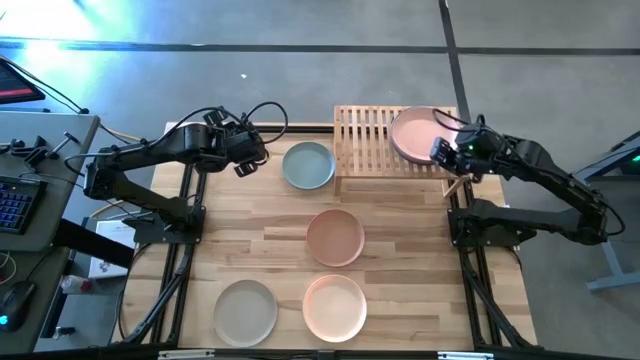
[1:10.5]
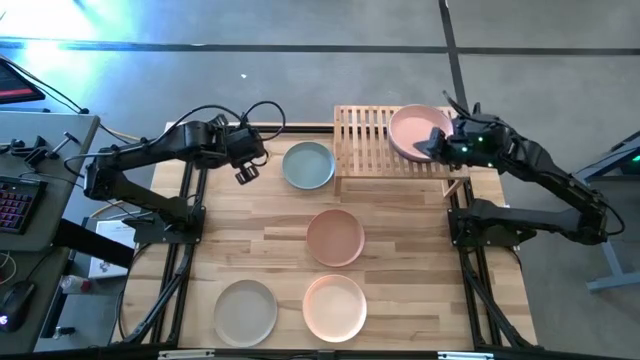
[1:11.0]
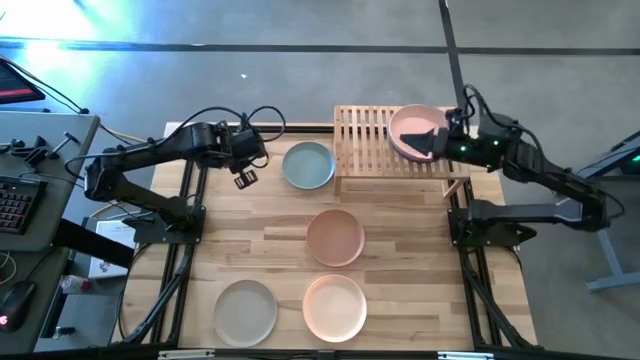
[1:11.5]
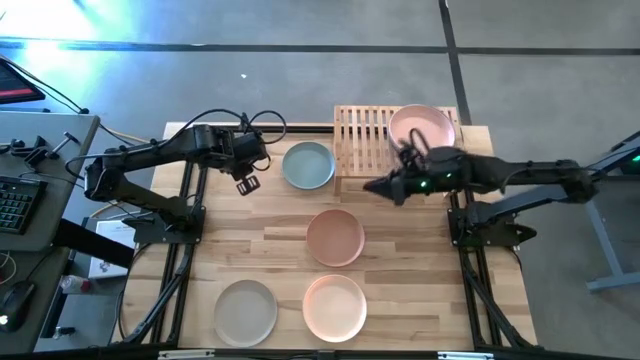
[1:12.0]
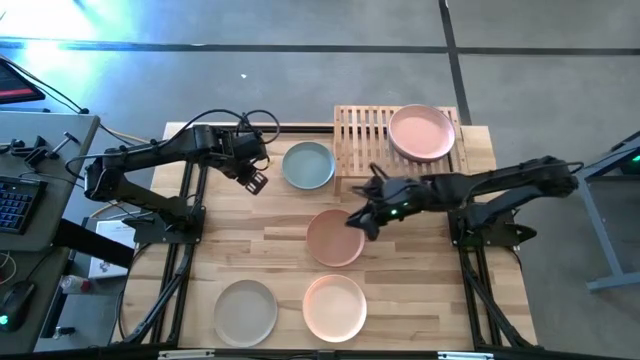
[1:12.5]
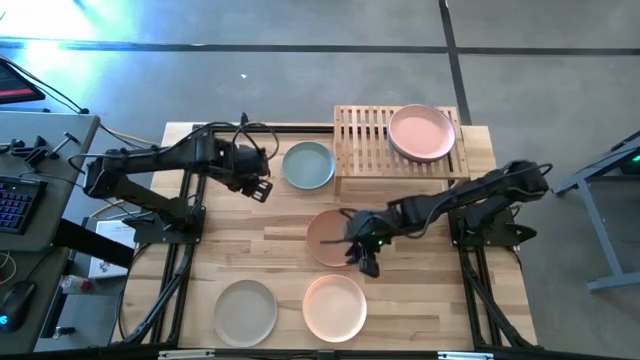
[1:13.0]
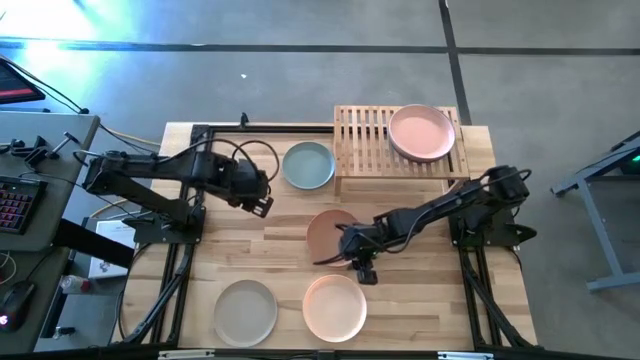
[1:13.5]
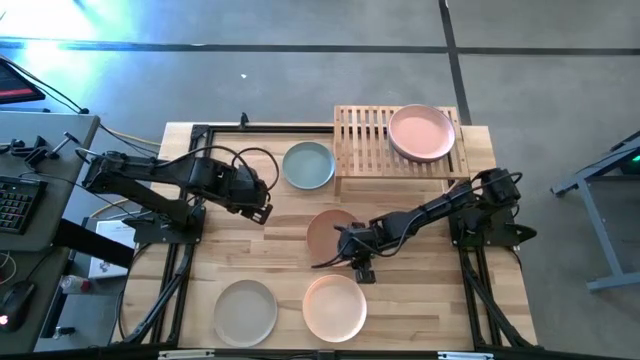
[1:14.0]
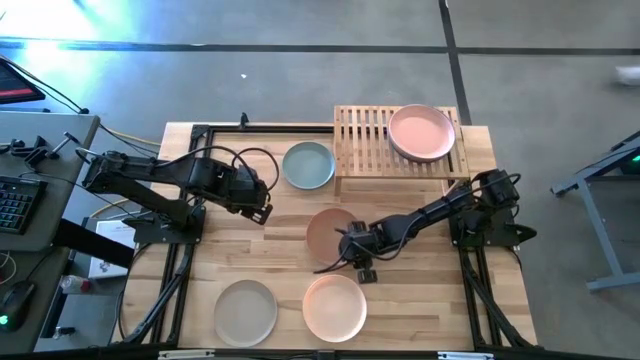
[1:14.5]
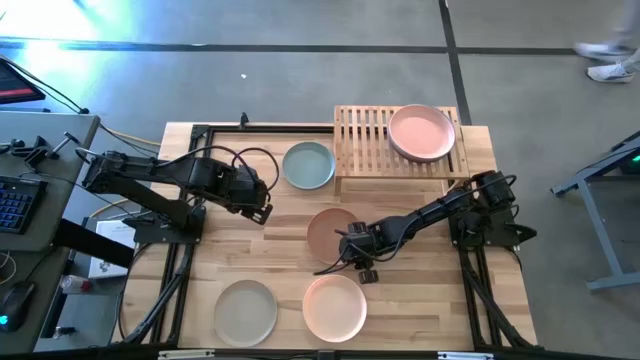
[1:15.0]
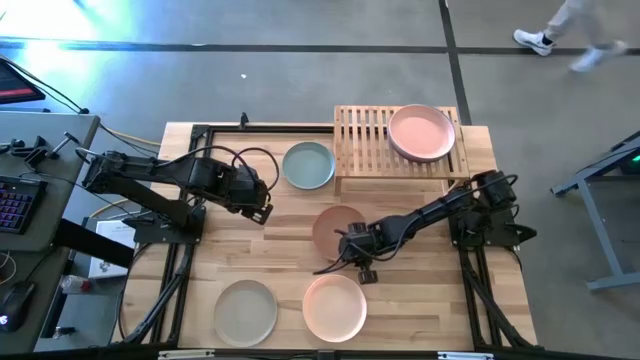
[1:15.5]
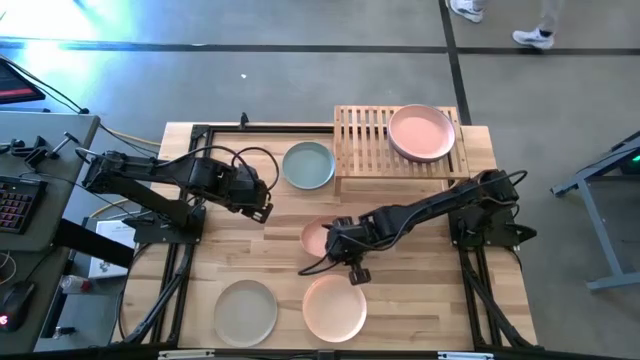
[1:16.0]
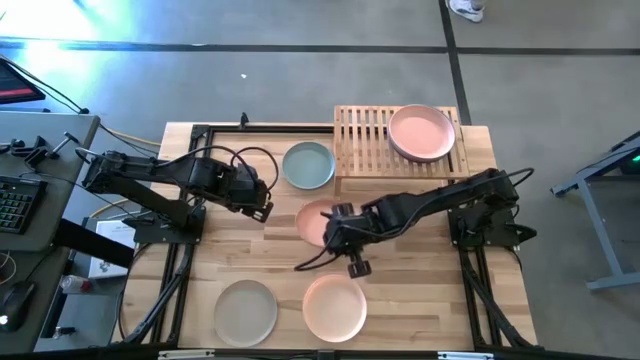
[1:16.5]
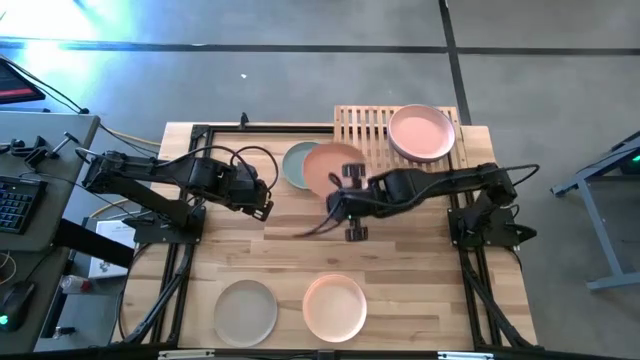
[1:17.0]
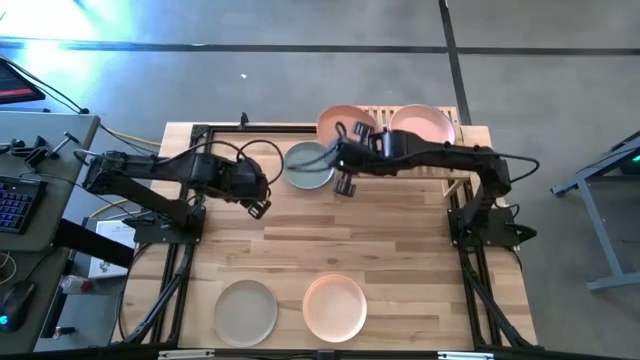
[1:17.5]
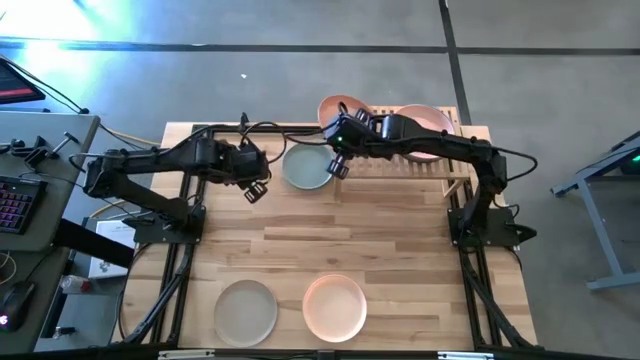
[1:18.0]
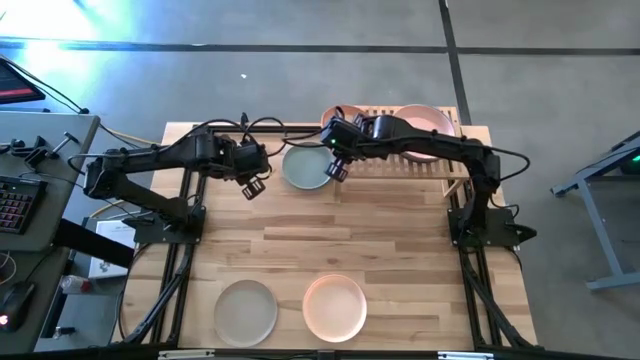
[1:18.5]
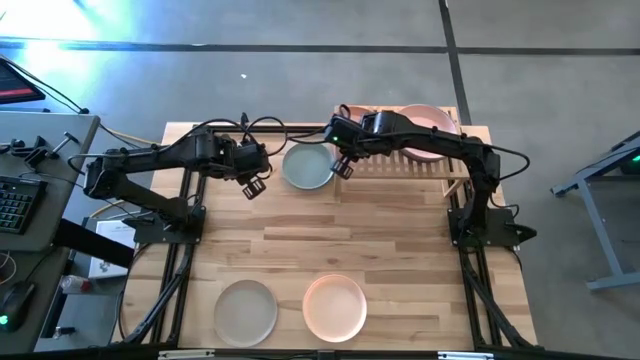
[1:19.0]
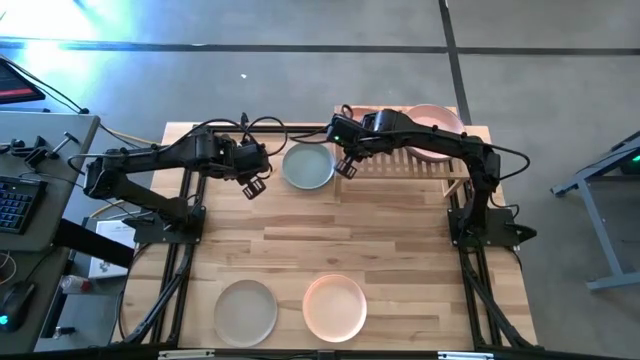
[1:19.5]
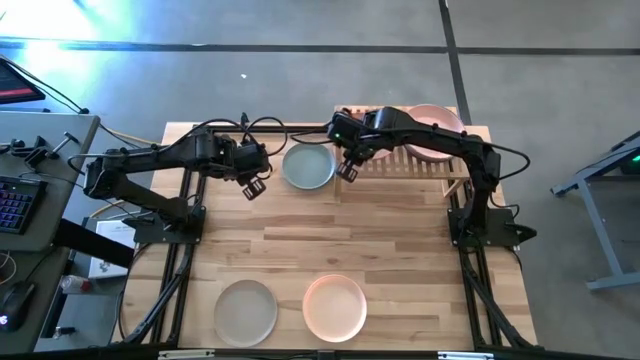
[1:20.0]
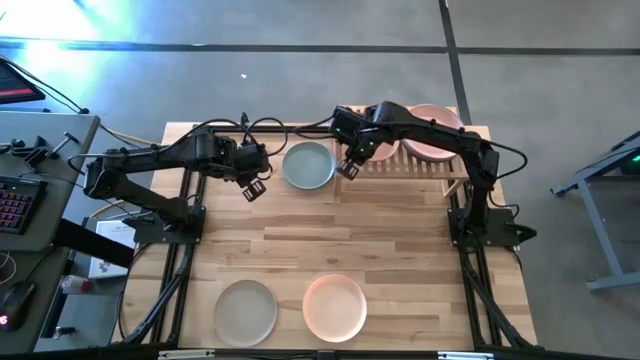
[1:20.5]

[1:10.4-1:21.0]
Task: Place and stack plates onto a shelf
Put the light brown plate on the shelf

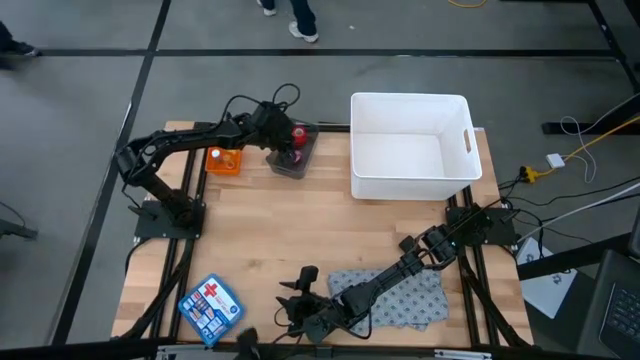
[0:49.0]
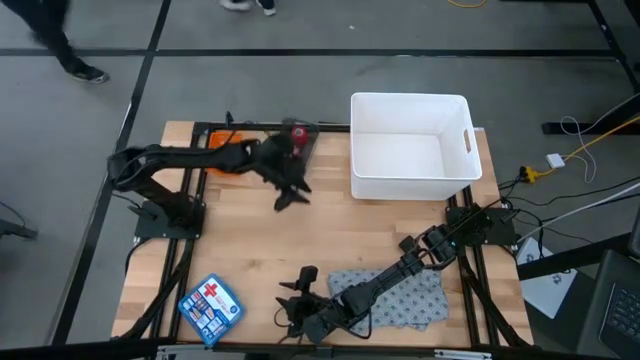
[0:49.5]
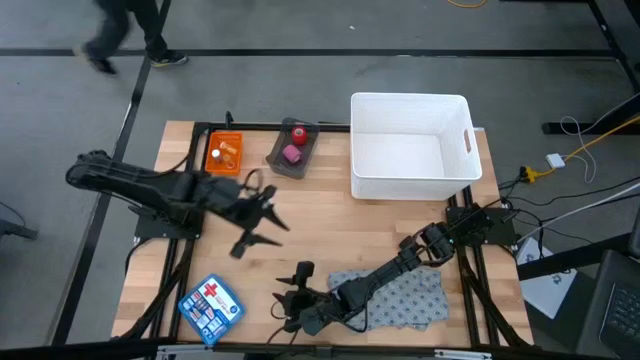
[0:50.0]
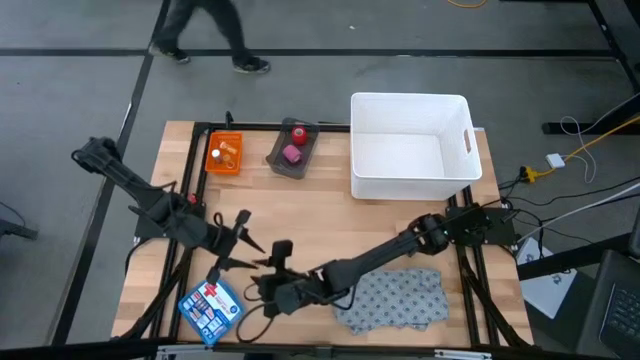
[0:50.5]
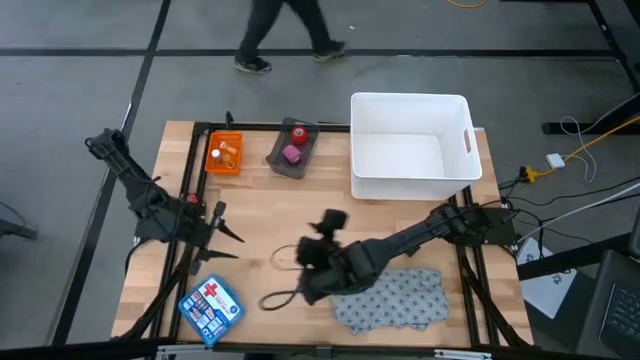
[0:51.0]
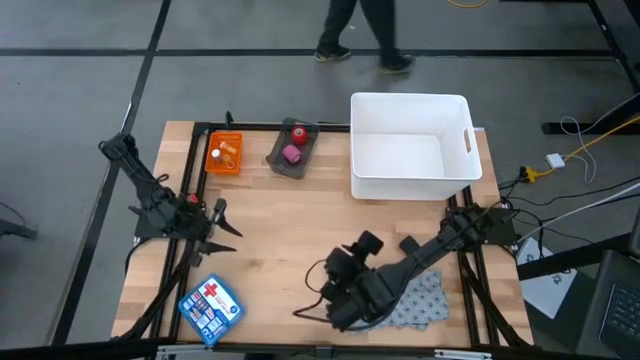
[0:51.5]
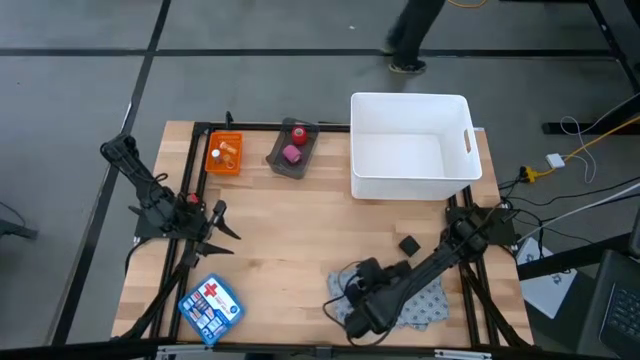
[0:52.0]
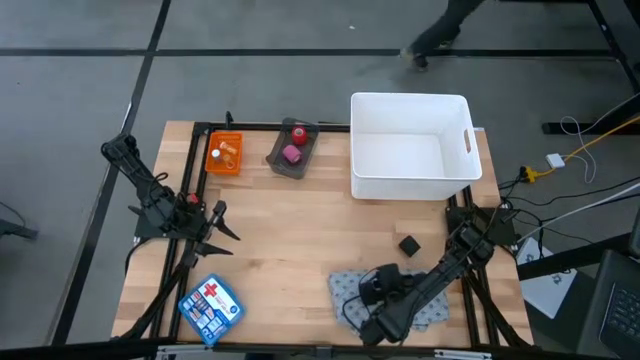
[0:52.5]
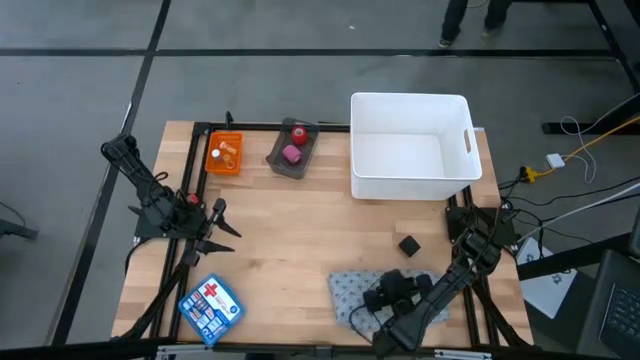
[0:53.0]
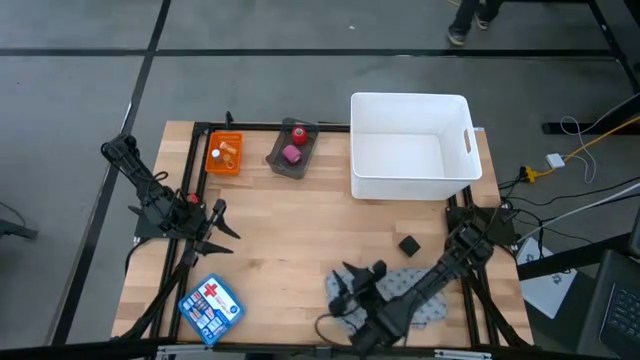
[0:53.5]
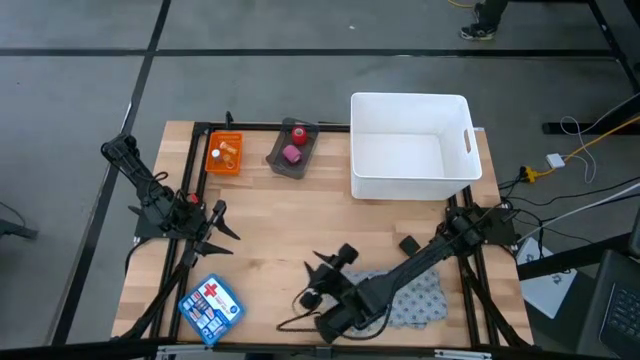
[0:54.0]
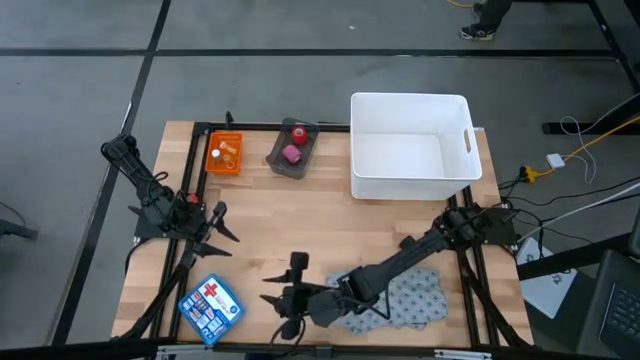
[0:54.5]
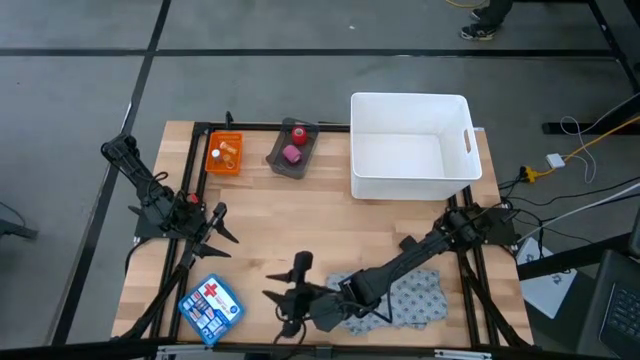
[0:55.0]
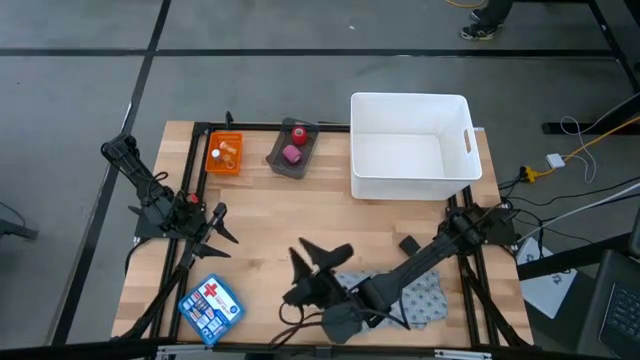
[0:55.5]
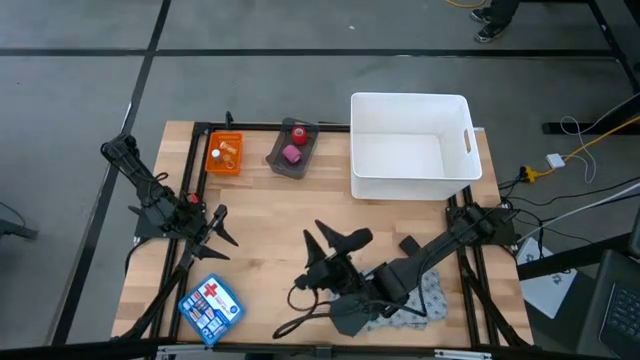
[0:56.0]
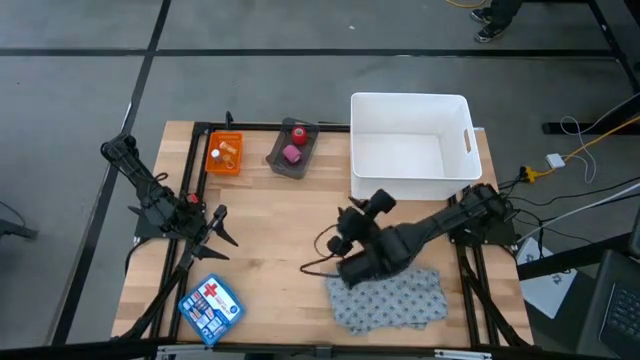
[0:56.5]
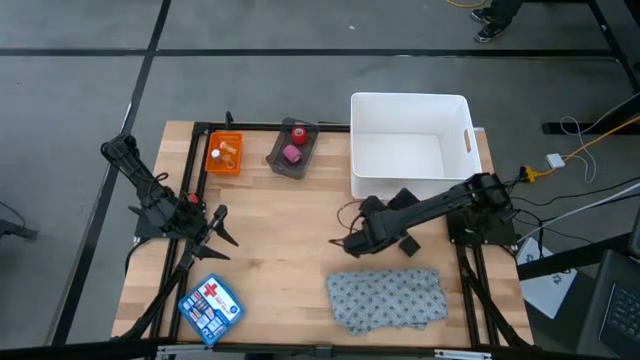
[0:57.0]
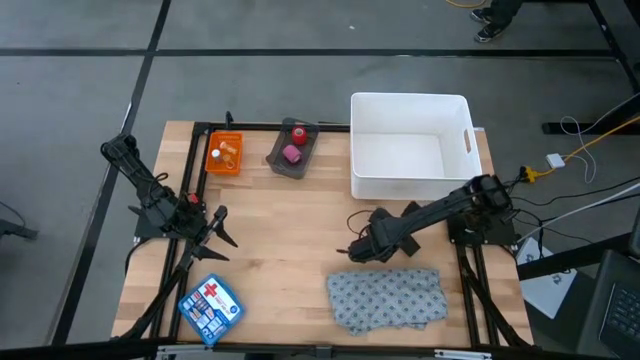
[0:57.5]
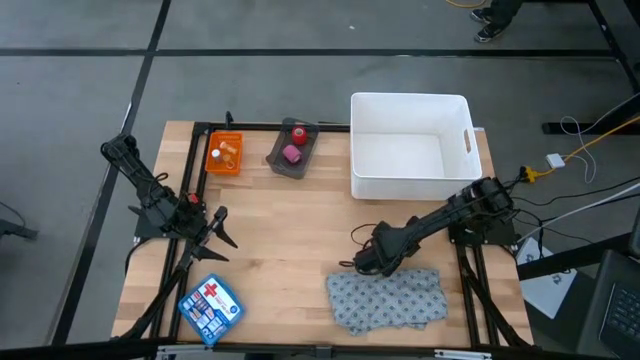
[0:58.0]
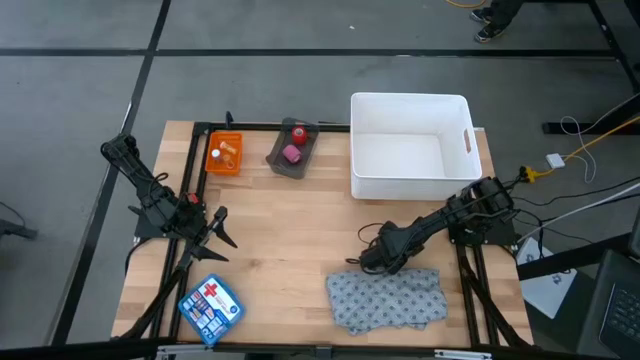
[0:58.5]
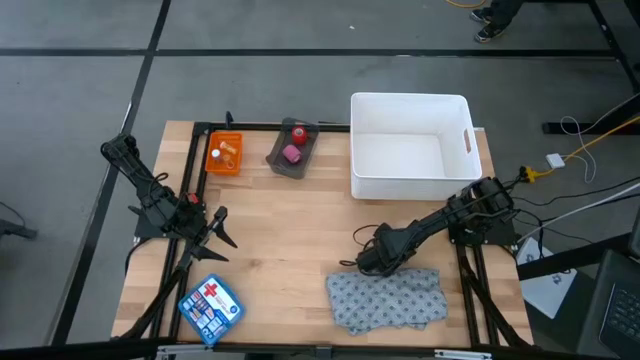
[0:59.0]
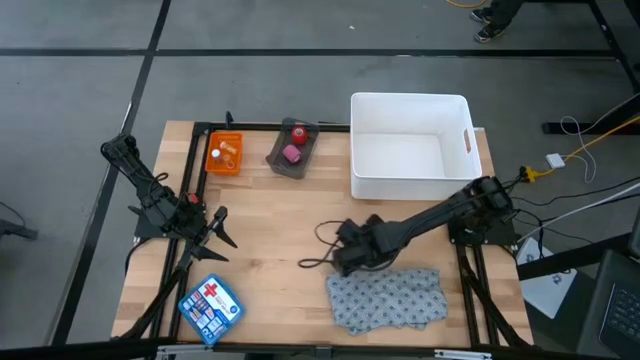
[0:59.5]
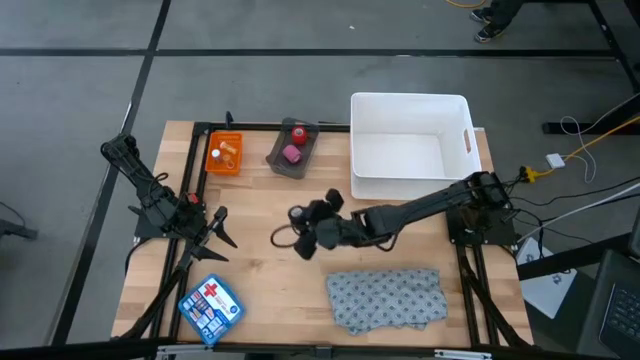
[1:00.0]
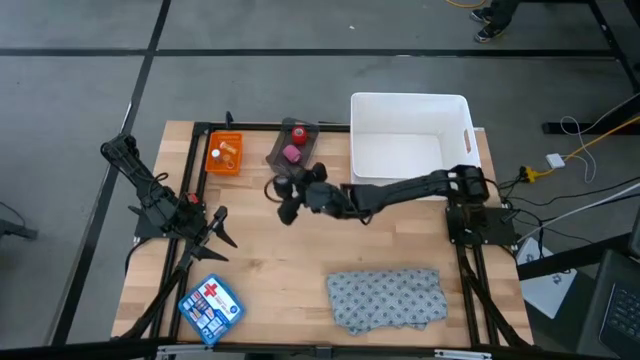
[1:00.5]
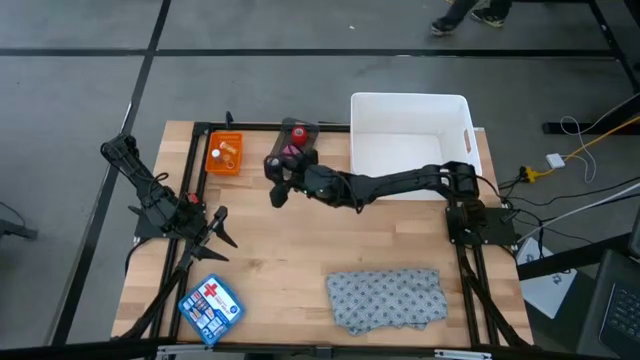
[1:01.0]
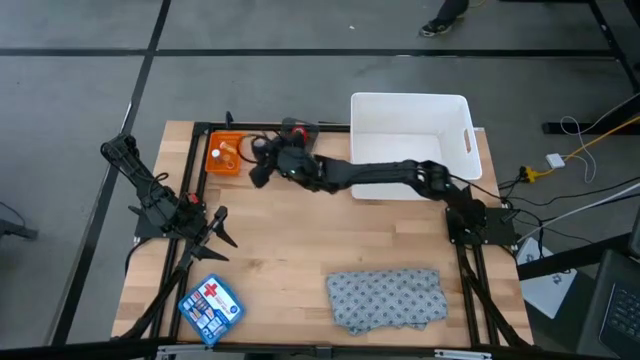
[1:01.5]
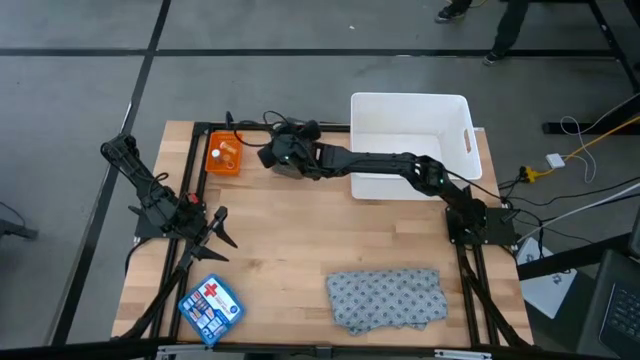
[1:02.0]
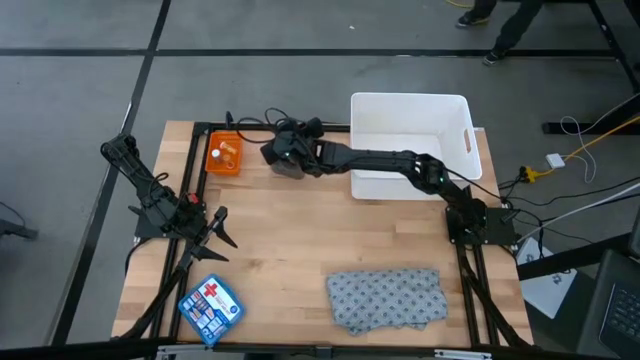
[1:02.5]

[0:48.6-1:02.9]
Task: Pick & place medical supplies in basket/bin
Put the black bandage into the black bin
